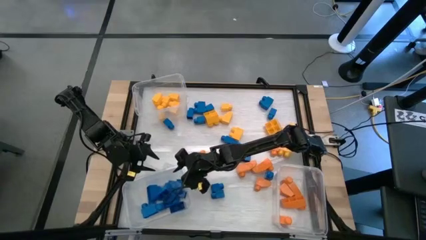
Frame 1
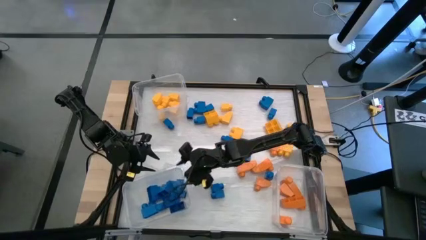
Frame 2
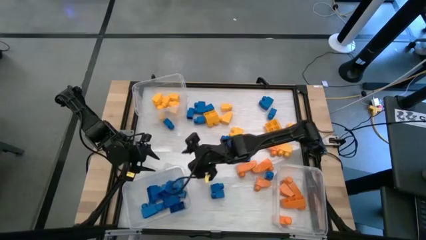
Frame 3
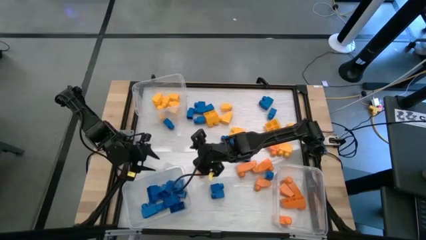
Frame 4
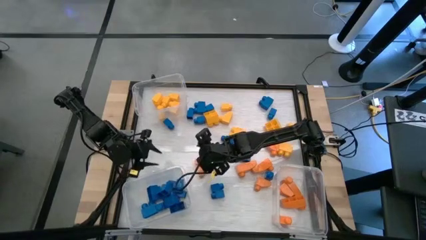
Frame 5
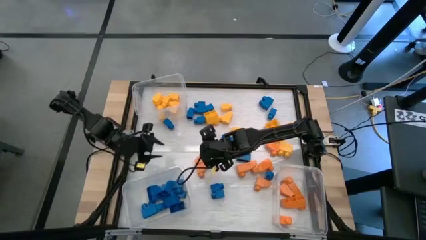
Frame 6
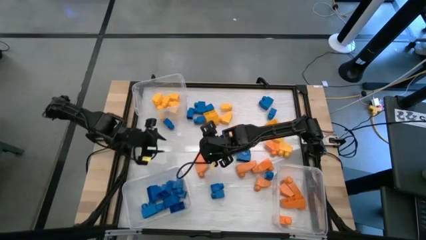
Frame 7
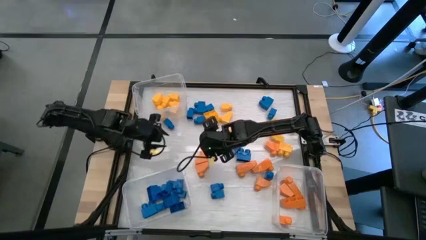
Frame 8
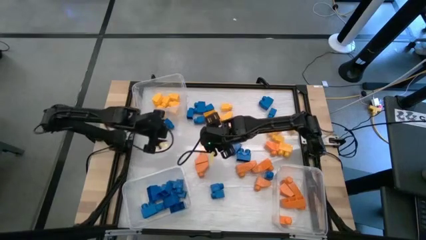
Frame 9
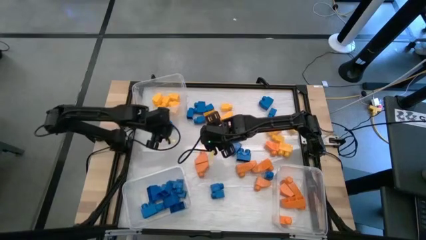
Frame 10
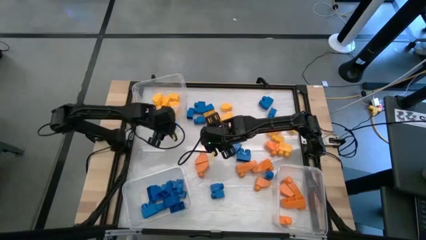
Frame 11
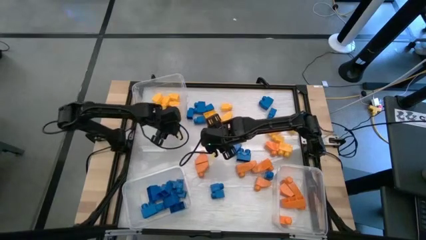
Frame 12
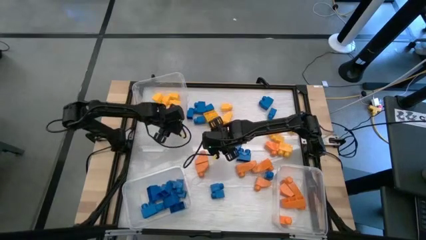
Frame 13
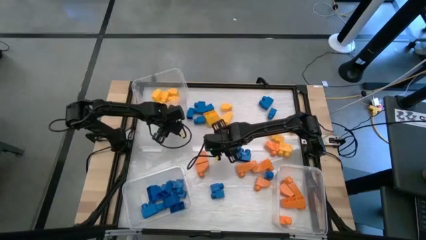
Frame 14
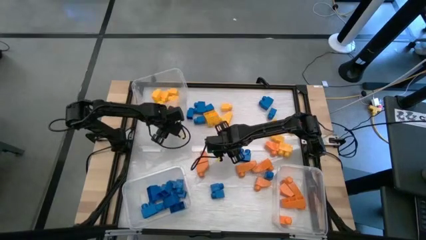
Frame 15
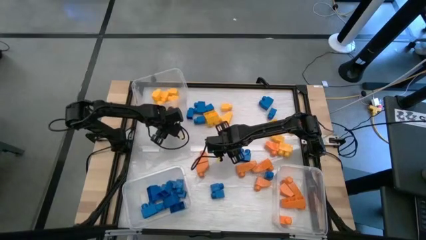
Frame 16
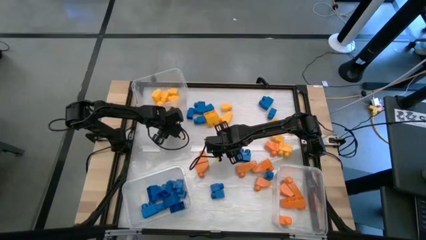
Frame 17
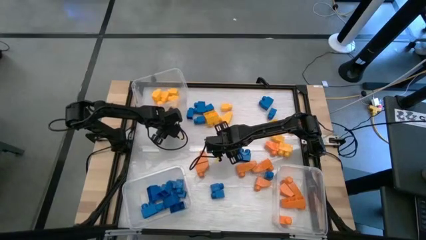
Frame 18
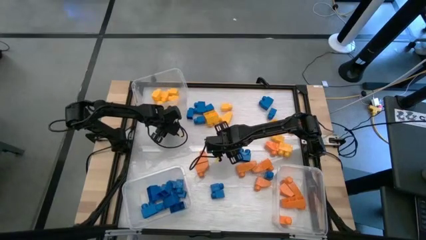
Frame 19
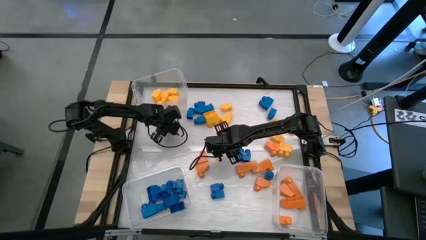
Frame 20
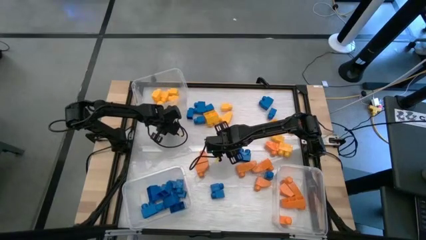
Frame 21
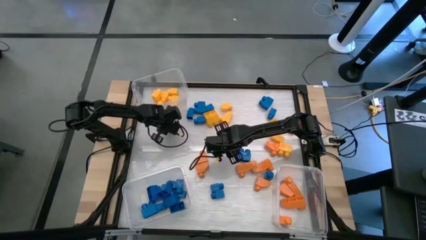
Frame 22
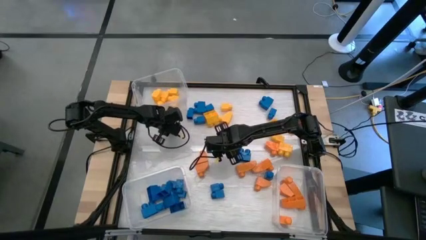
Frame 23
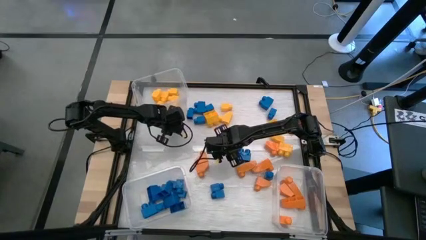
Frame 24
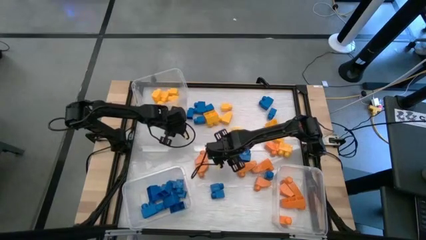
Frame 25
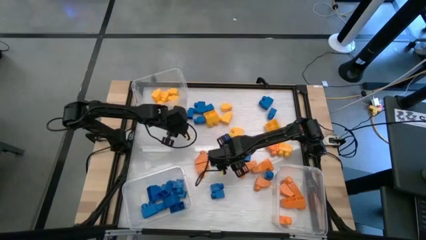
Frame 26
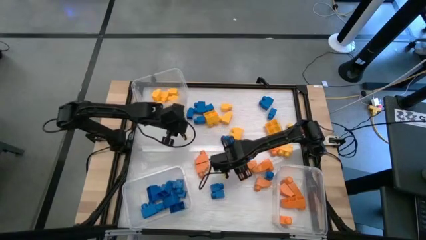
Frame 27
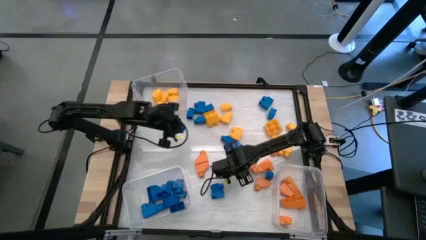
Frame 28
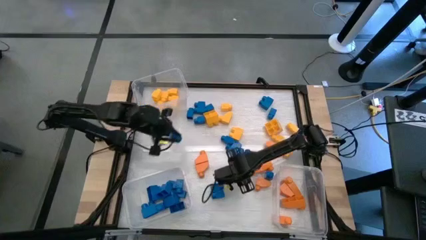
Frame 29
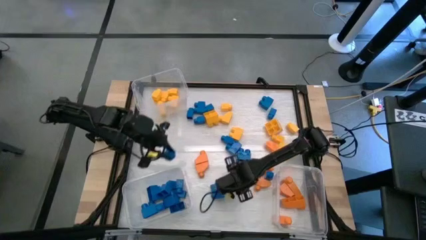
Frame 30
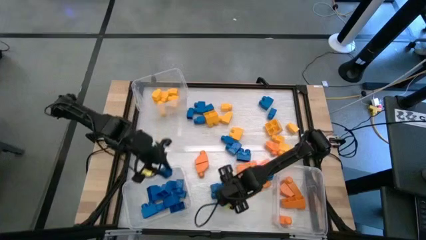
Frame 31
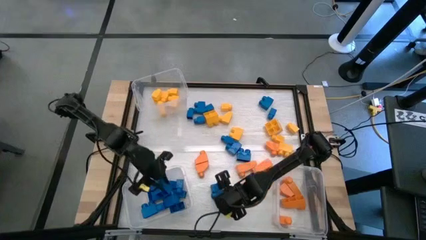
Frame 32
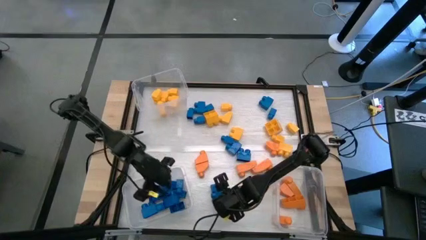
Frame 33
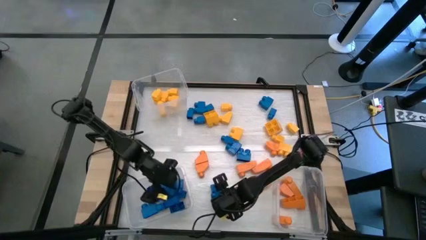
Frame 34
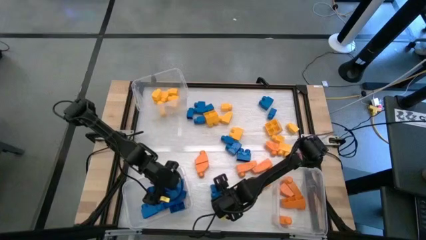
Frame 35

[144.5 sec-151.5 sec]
Task: Sort blocks
Put the blue game piece into the bottom left transparent bin

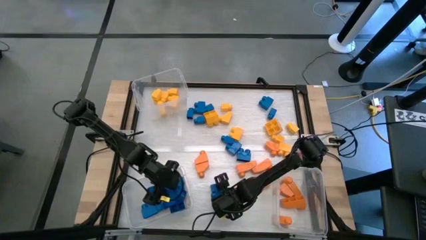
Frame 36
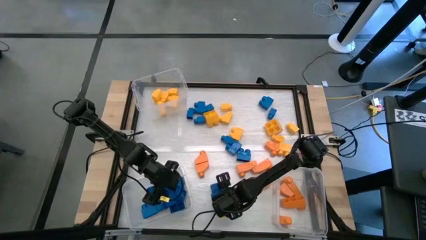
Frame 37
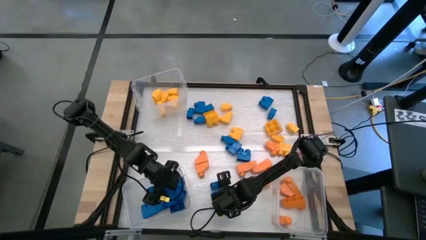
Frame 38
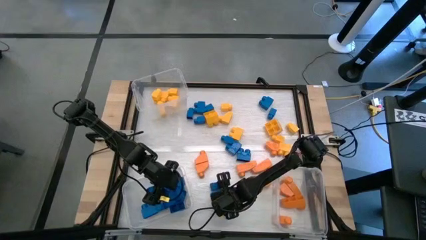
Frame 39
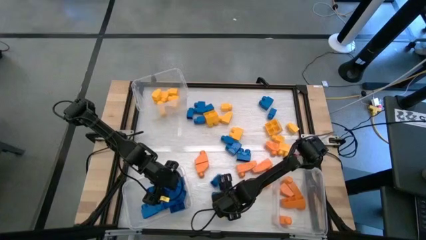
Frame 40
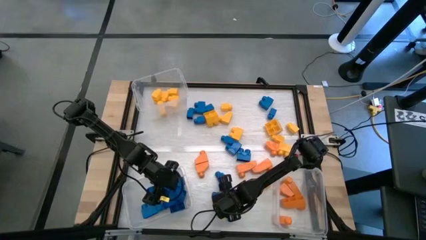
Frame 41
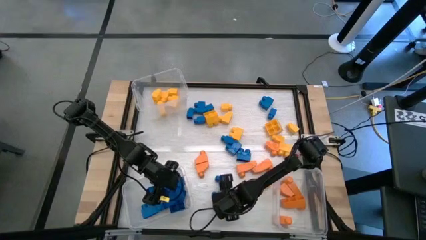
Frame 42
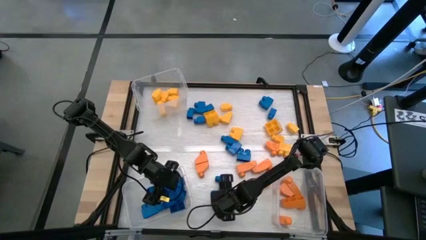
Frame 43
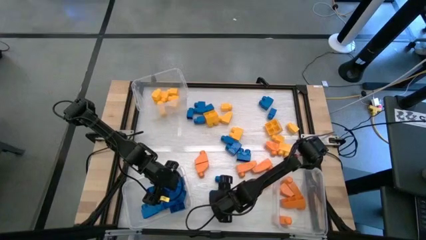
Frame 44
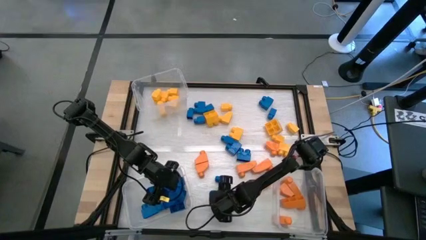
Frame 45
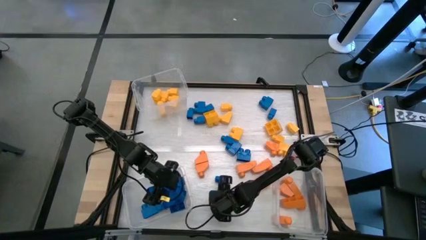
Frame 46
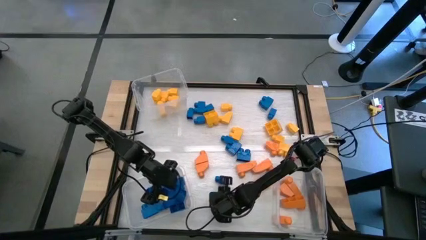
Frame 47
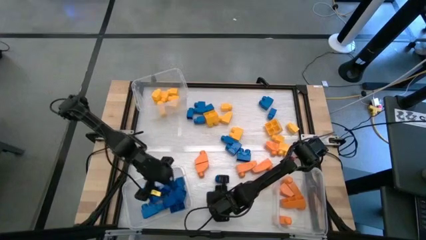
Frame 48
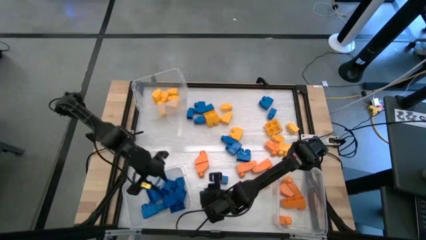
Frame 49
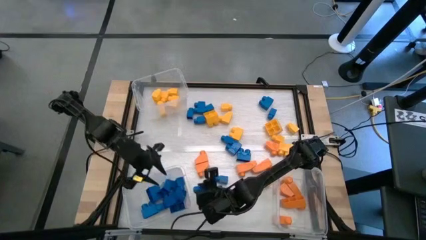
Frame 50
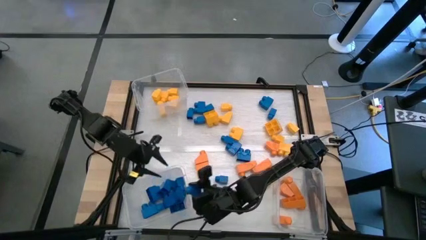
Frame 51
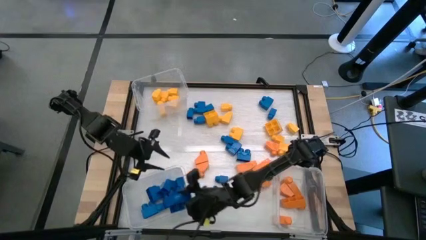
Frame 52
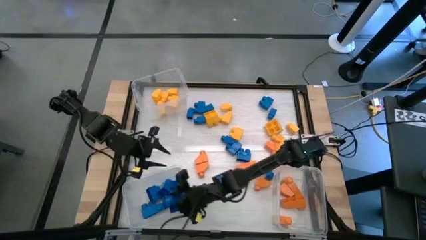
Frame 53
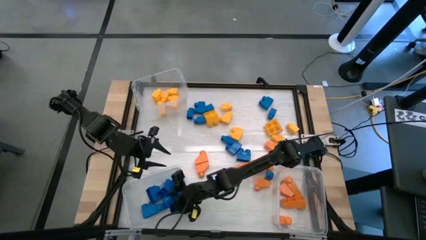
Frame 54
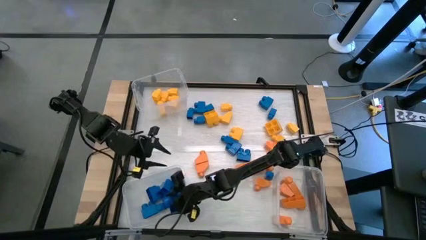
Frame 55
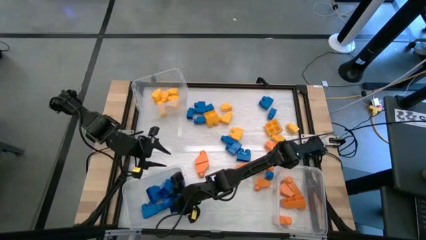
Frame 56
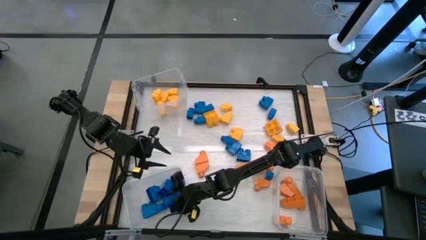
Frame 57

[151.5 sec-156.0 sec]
Put the blue game piece into the bottom left transparent bin

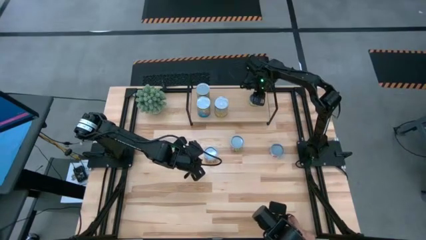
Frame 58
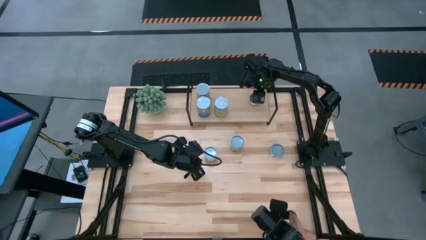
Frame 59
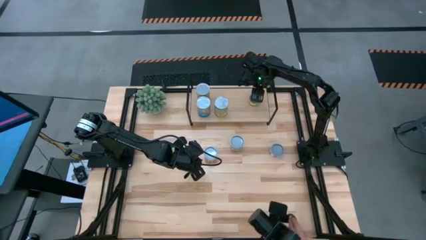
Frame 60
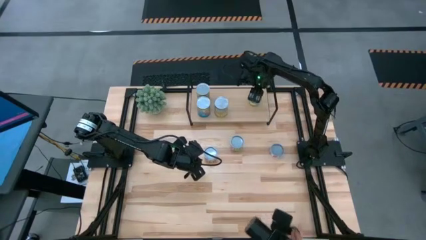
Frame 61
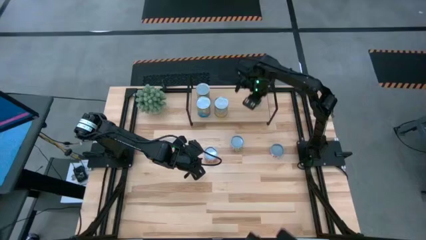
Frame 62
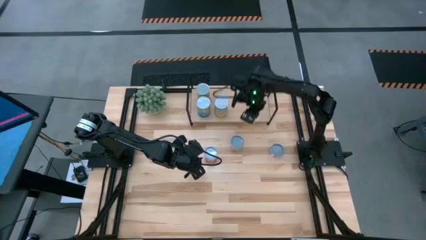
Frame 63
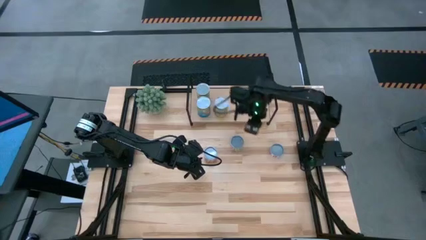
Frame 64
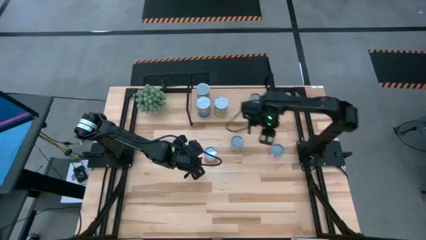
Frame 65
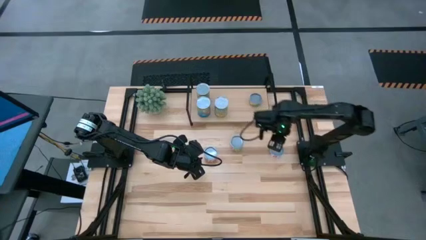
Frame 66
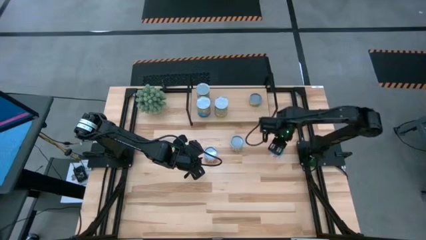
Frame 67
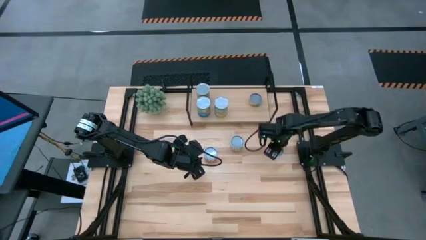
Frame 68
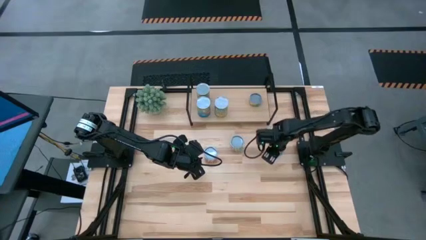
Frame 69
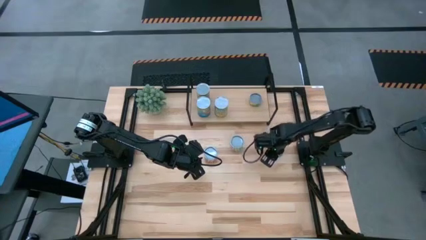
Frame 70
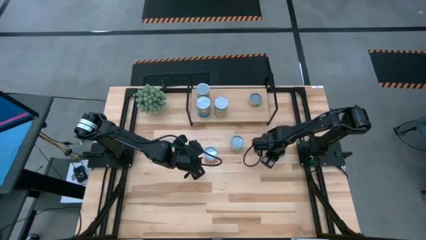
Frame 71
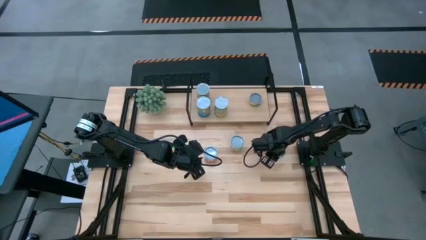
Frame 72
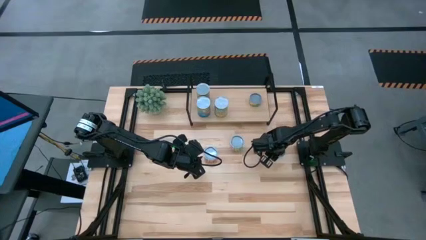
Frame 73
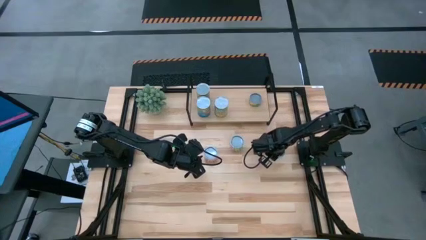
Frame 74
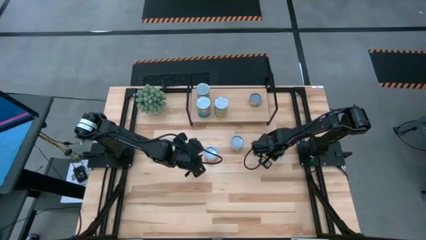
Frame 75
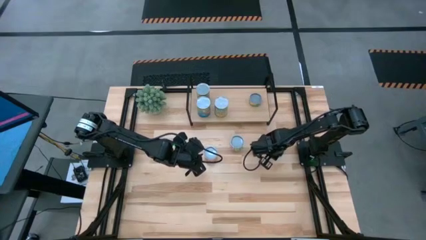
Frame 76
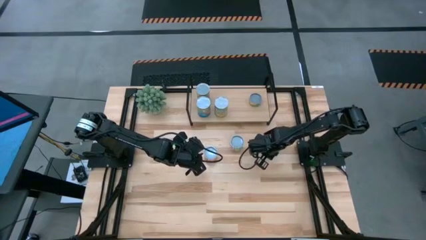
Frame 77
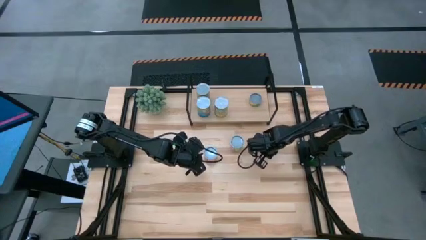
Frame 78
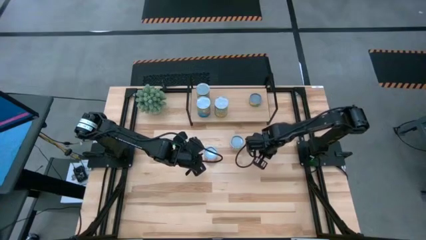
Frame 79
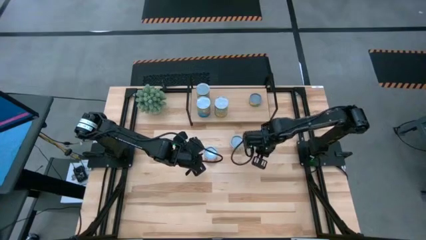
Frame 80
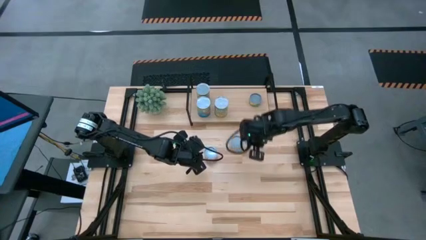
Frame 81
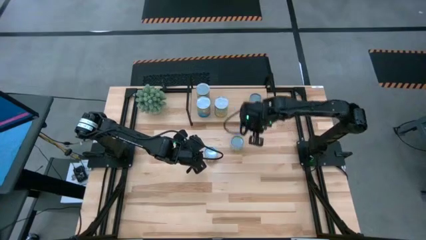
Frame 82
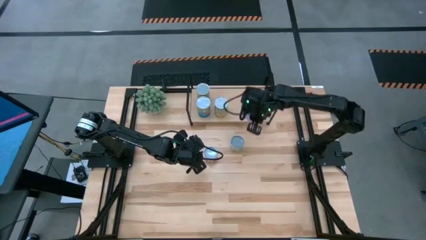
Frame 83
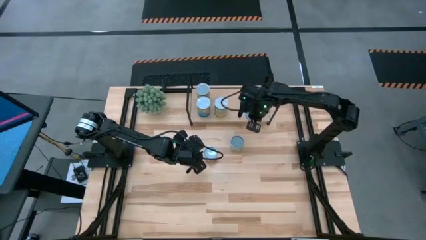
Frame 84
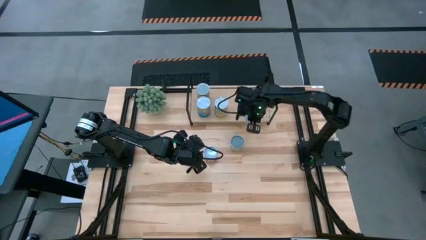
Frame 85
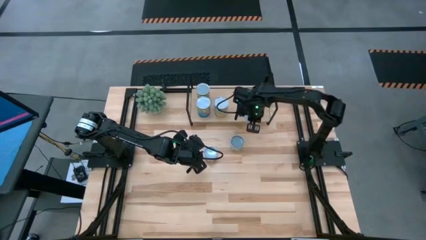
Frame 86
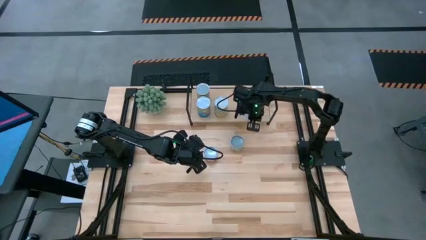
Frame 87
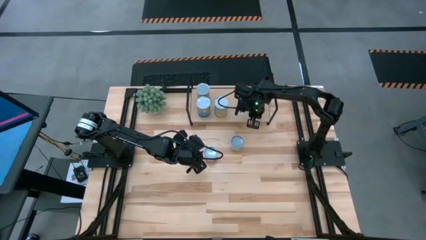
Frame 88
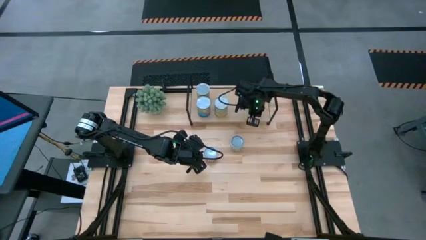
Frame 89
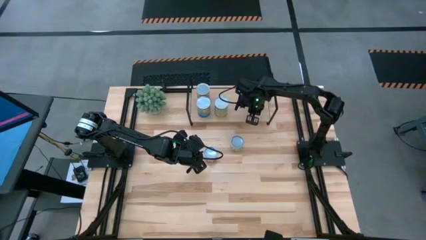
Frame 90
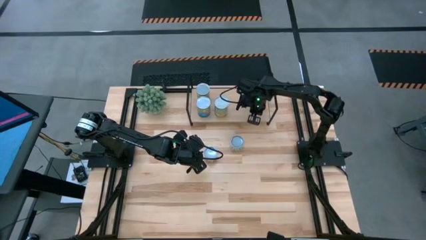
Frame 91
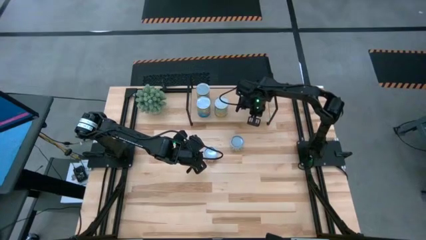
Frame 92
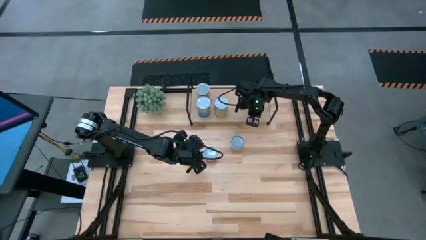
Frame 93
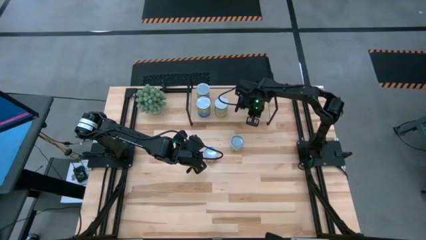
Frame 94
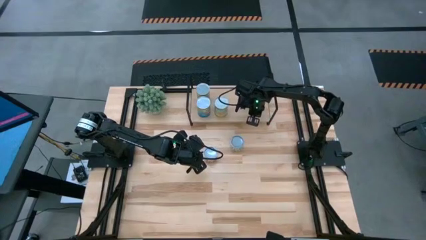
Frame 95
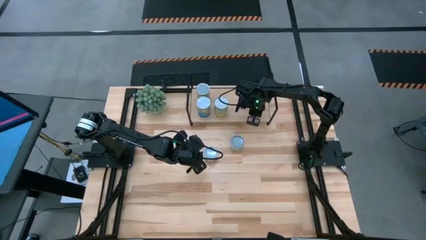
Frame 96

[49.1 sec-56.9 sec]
Task: Pick and place cans onto a shelf
Put the canned salmon on the shelf
